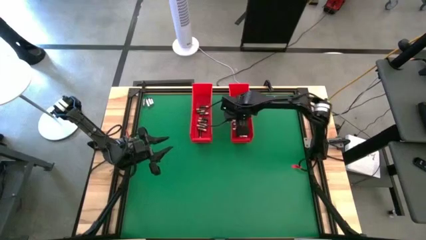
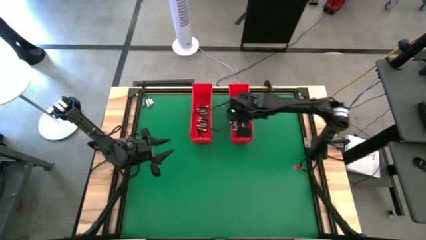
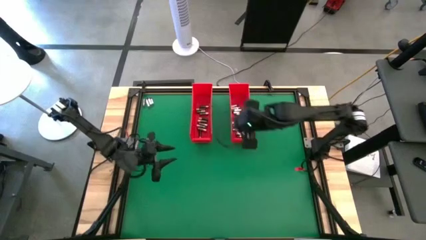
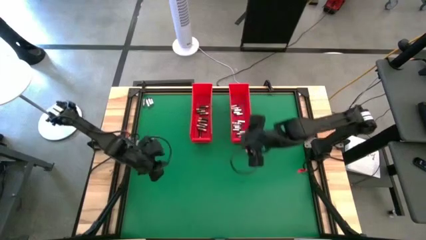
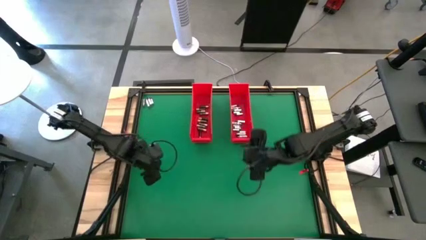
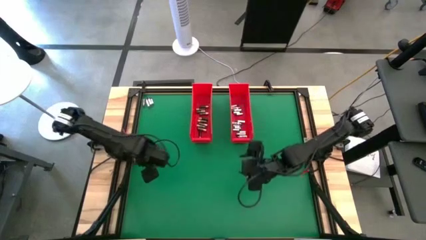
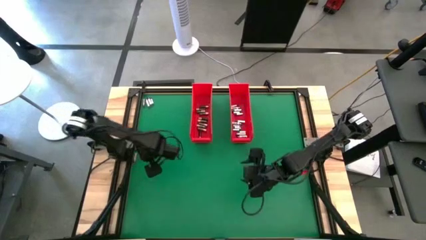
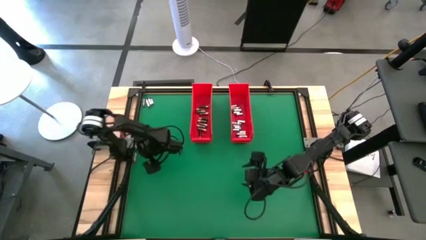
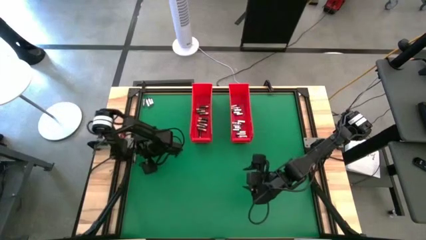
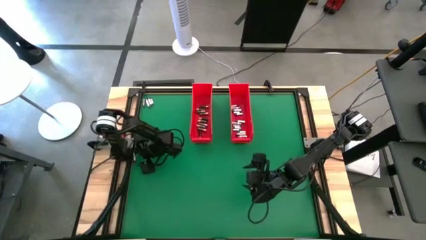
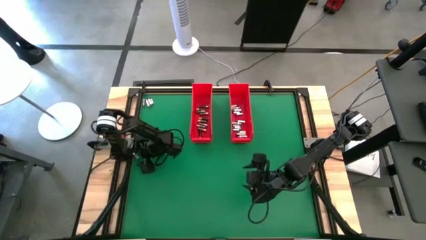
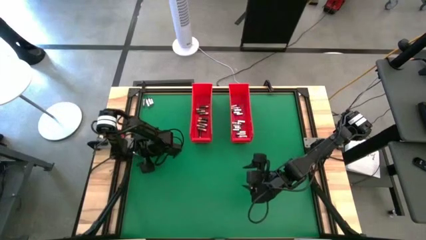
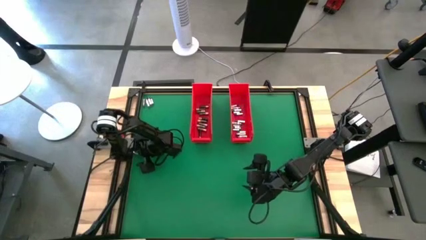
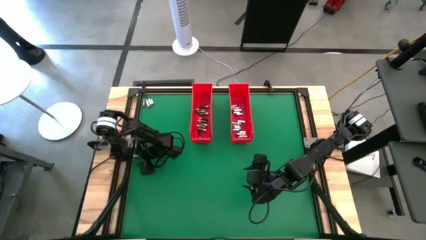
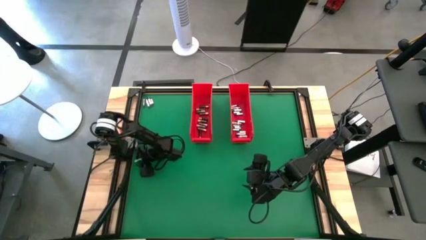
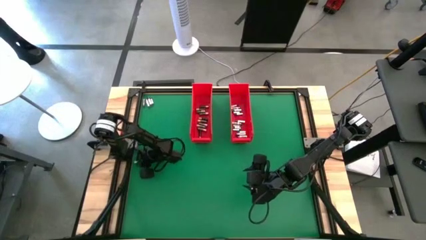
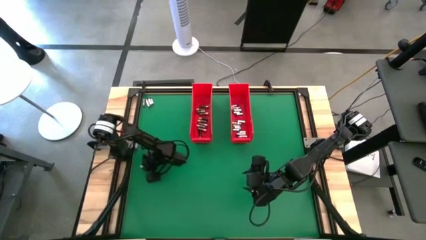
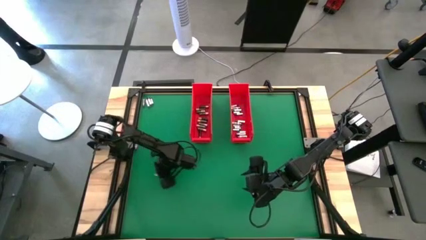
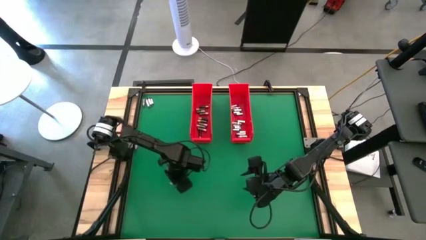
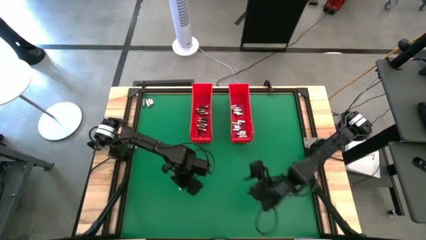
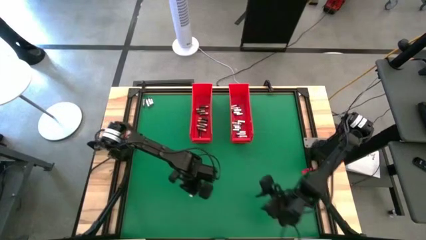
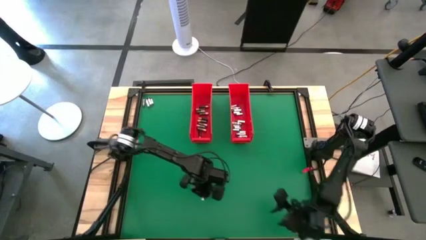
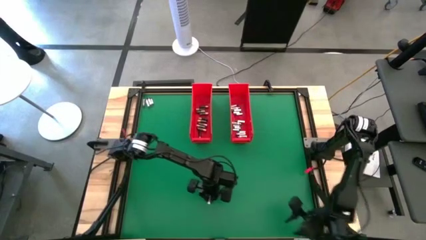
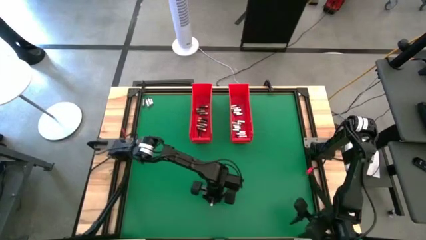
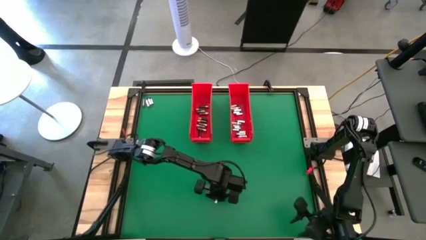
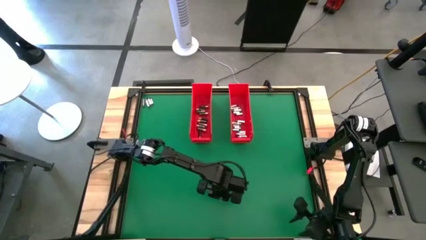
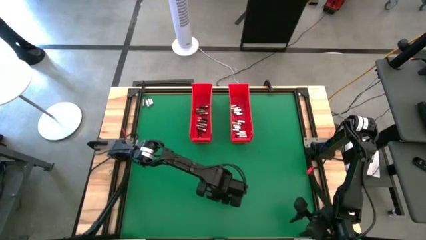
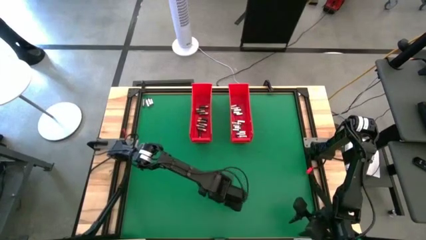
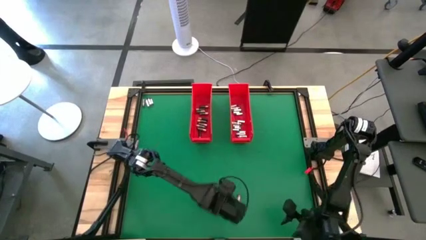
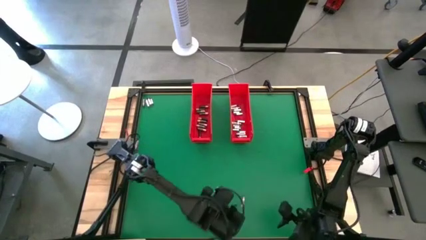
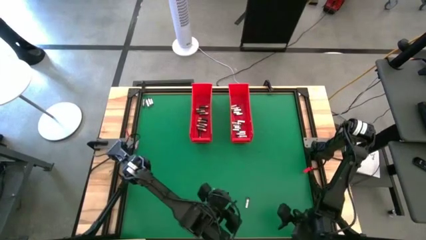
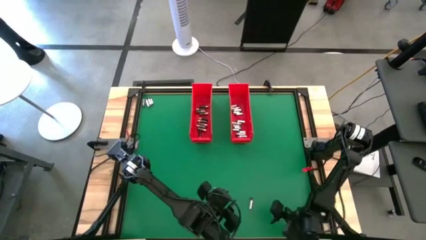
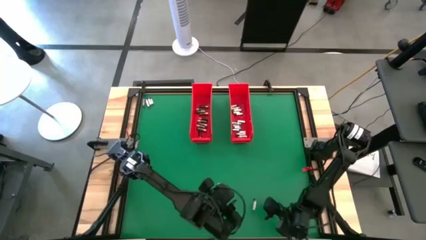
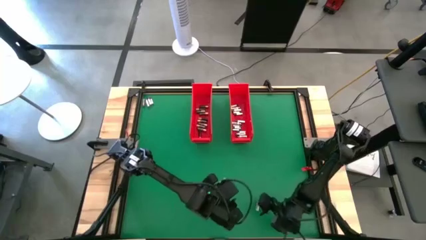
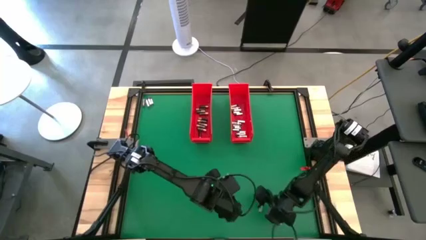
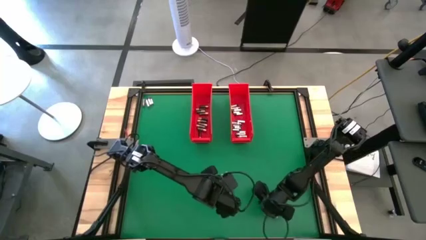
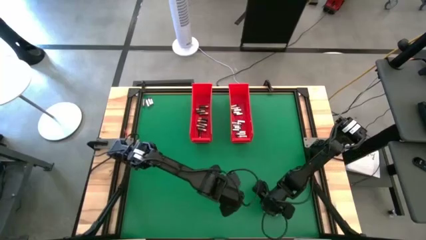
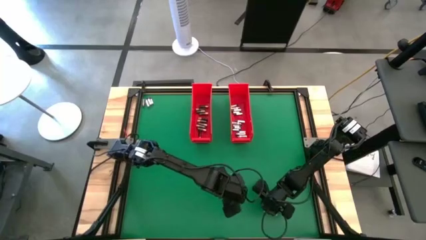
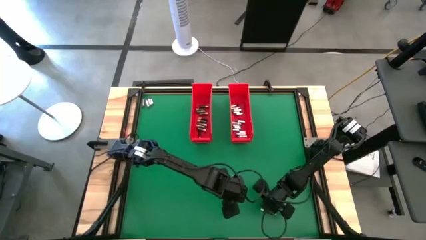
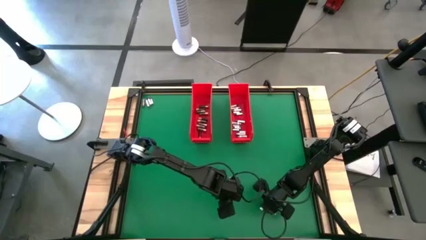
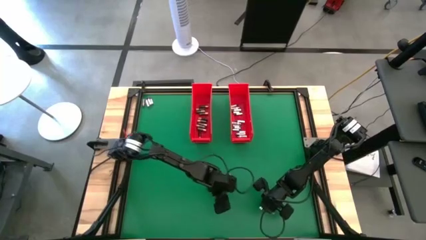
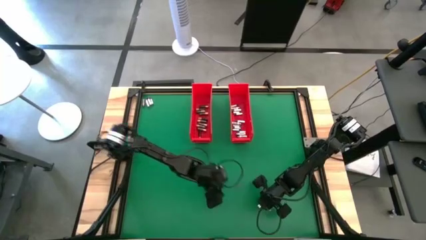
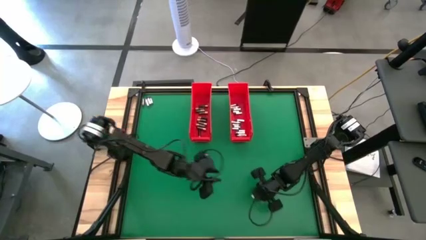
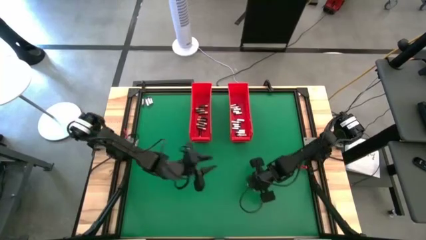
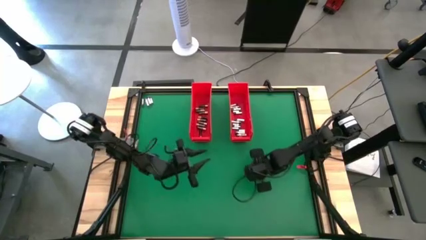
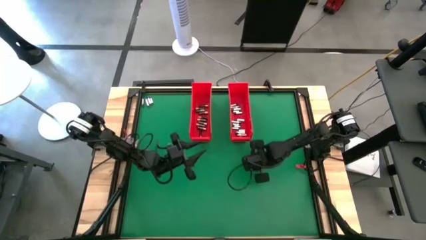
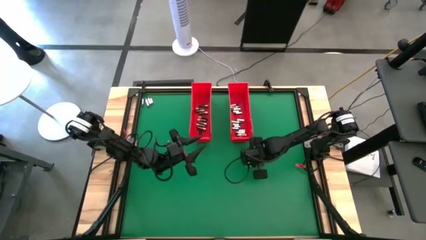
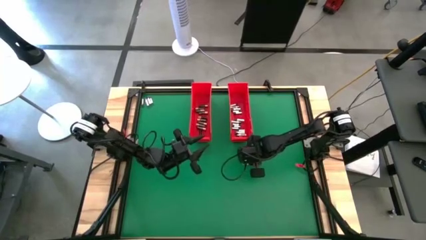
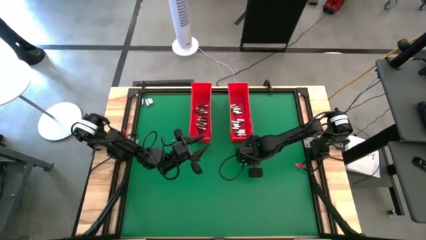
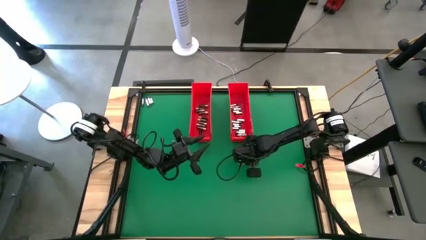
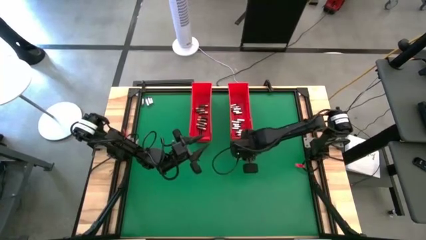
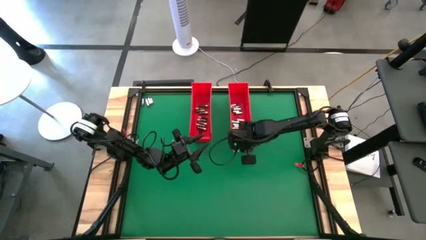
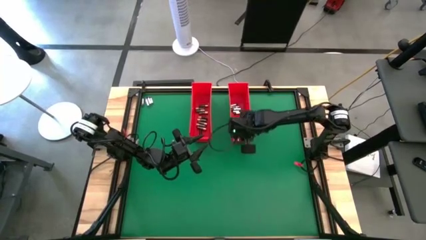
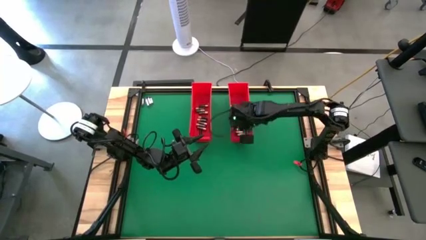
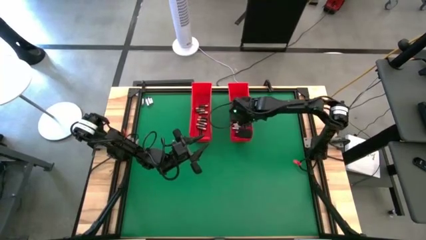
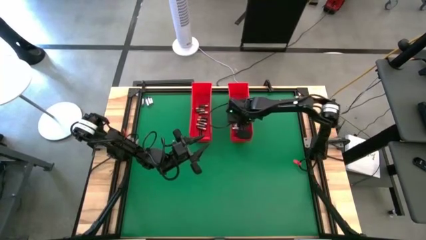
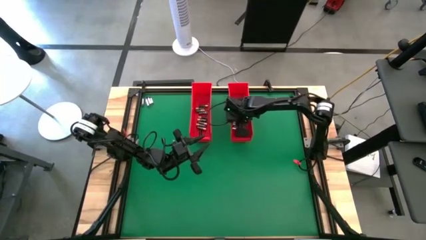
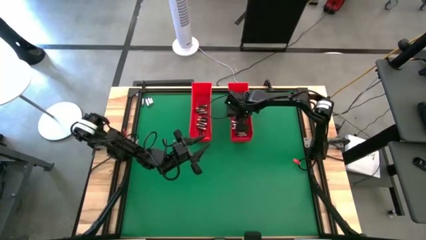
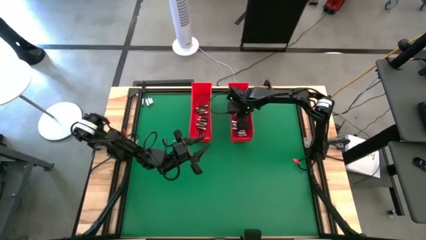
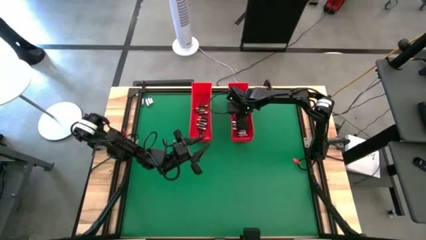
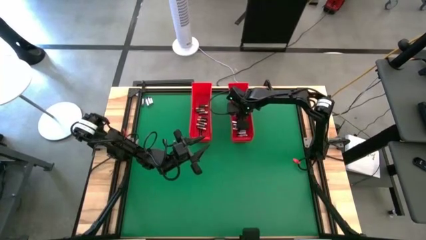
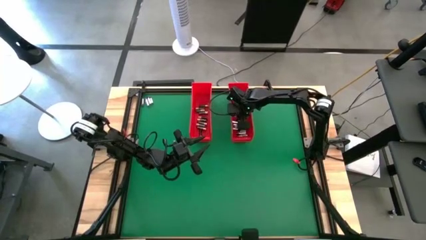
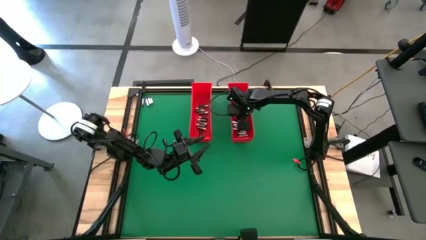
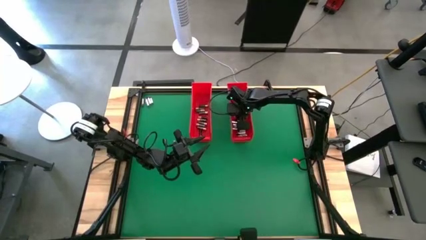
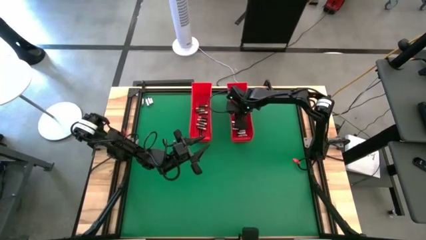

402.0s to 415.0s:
Task: Sort batteries
Put the silver battery into the right red bin

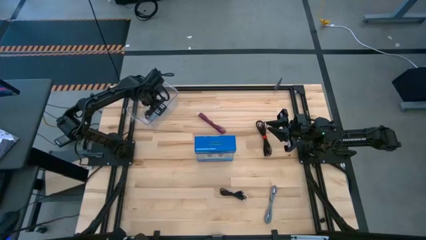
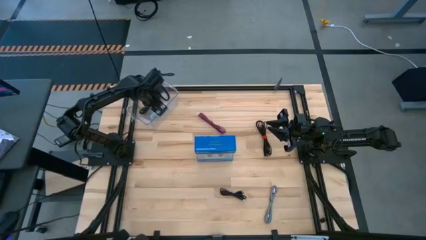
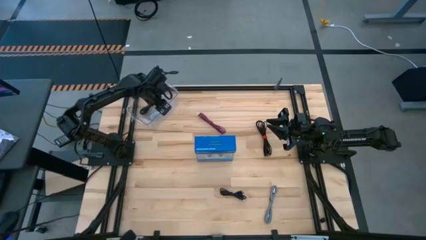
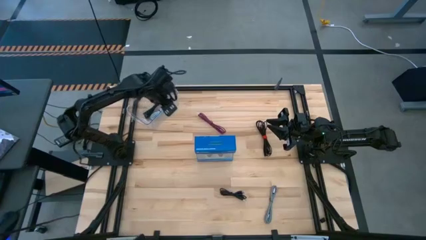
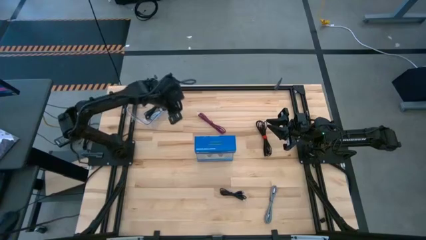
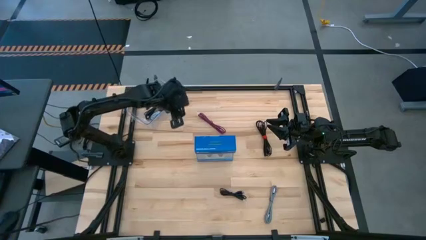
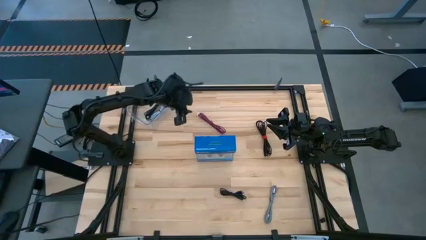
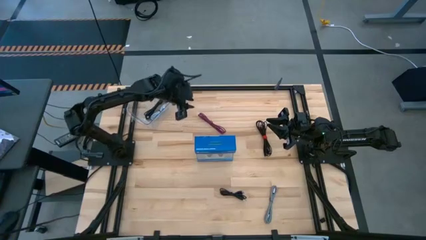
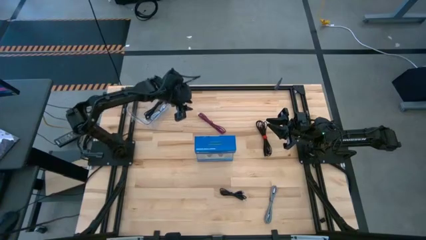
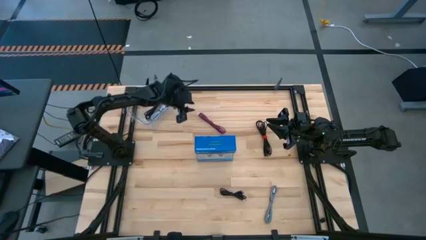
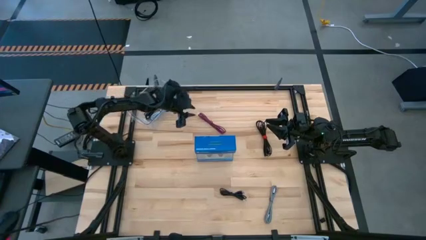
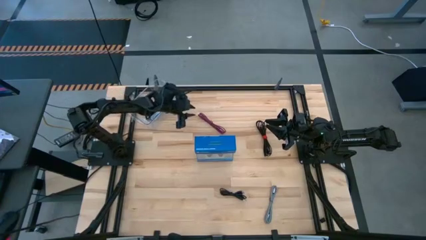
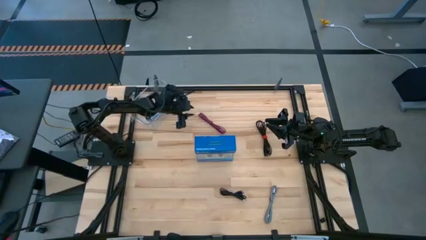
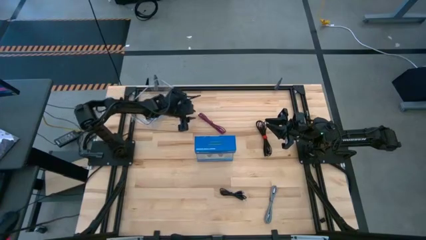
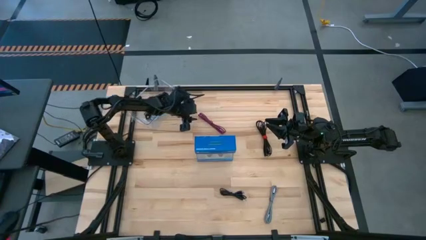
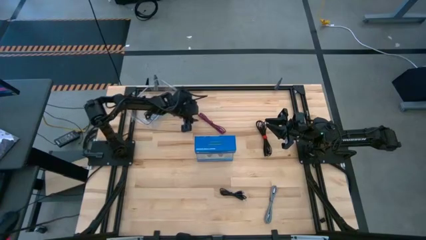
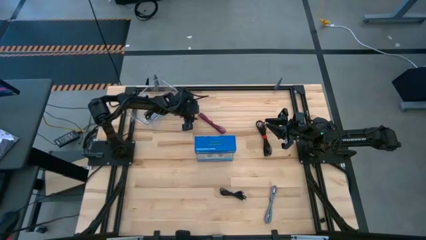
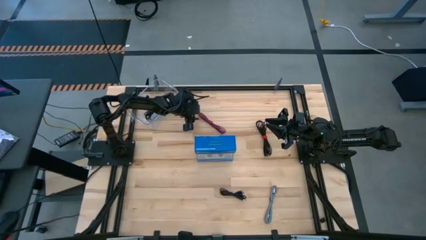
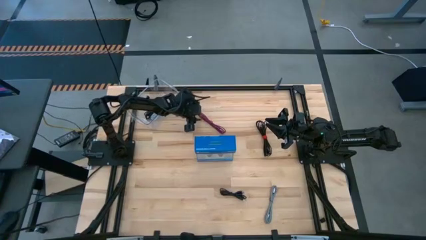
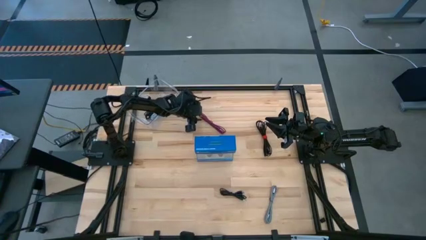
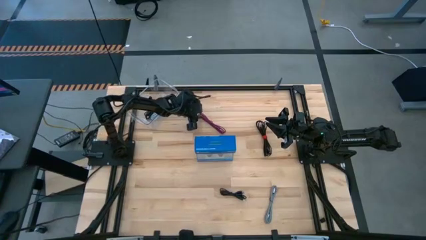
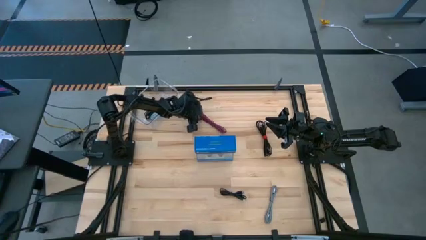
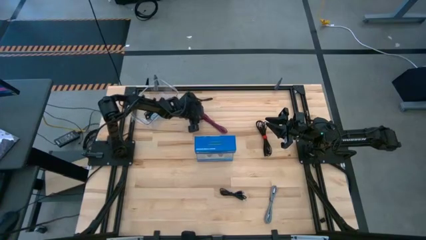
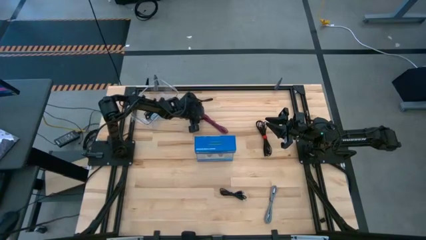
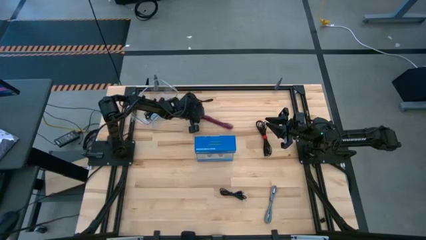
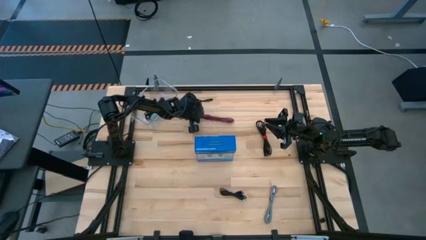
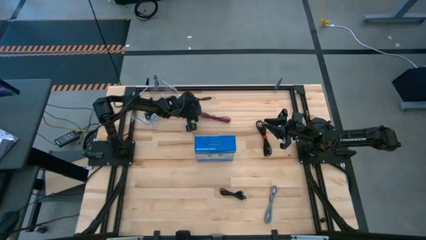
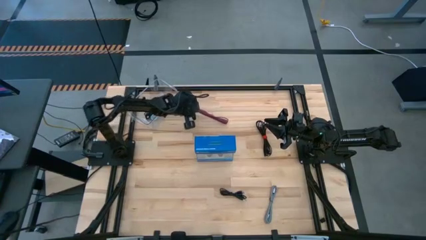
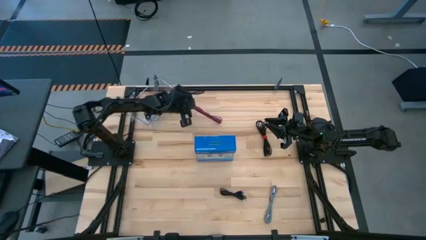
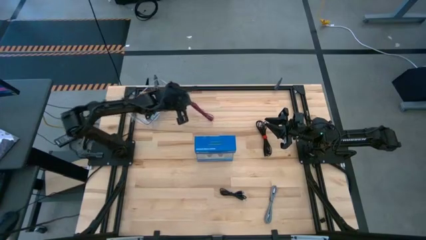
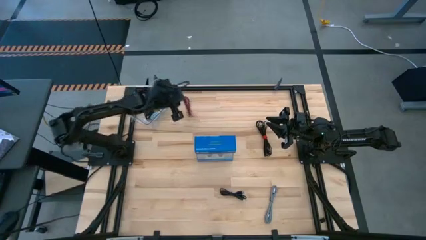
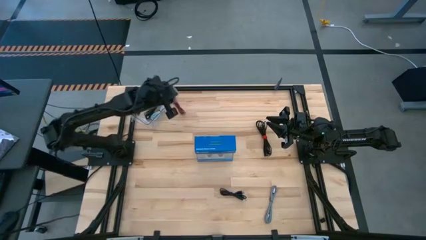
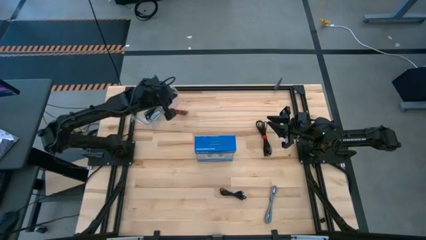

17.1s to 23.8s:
Task: Pick and place USB-C Cables
Put the pink charger cable into the transparent bin
